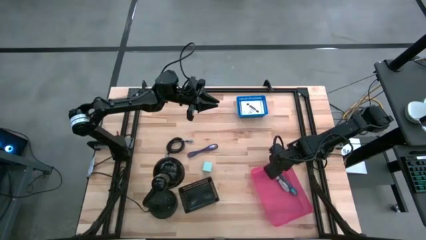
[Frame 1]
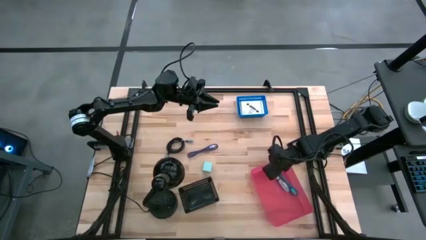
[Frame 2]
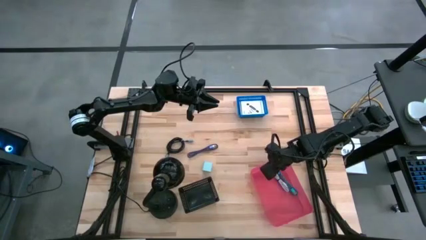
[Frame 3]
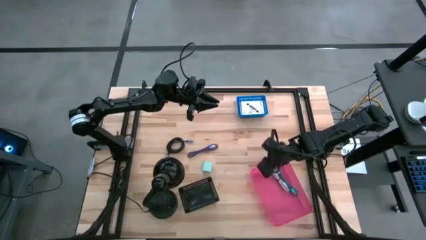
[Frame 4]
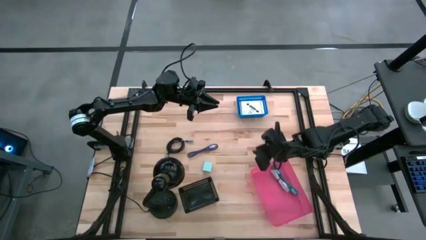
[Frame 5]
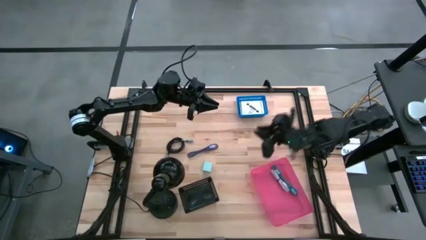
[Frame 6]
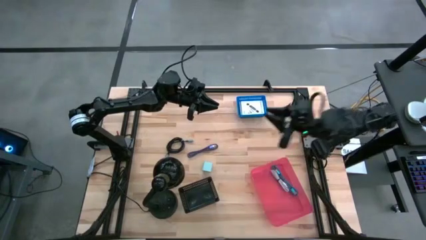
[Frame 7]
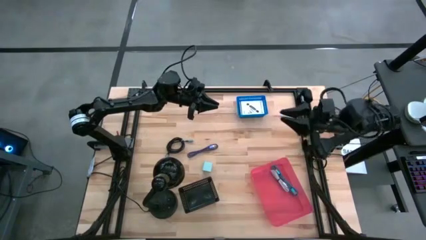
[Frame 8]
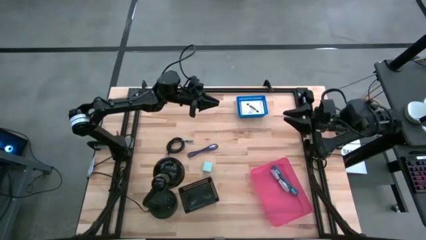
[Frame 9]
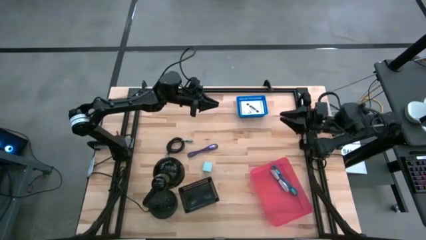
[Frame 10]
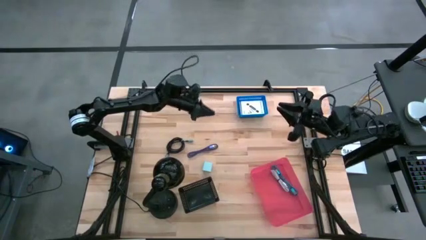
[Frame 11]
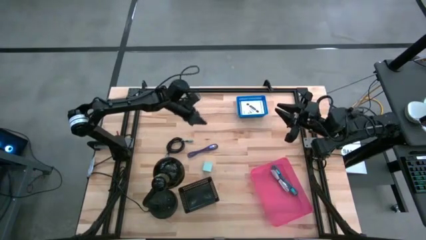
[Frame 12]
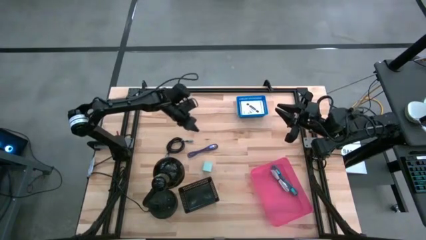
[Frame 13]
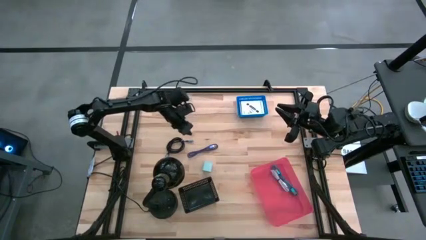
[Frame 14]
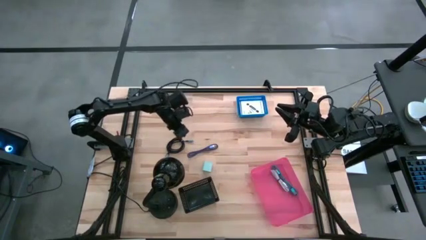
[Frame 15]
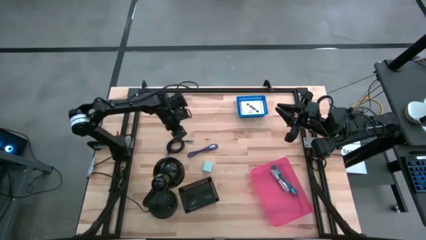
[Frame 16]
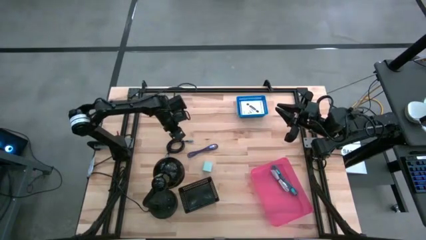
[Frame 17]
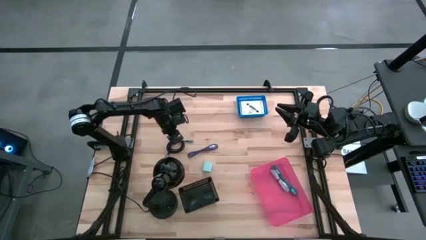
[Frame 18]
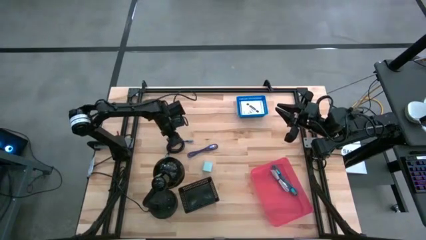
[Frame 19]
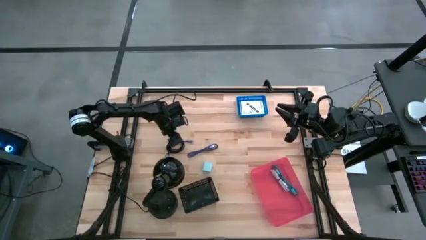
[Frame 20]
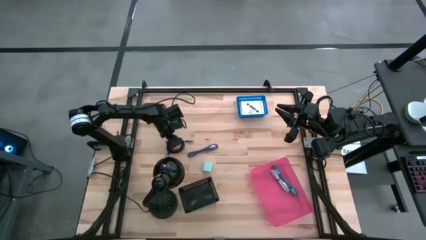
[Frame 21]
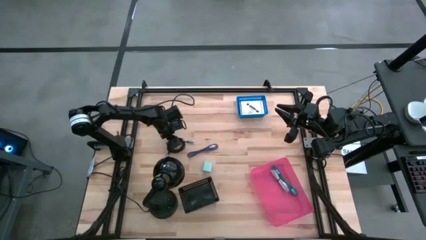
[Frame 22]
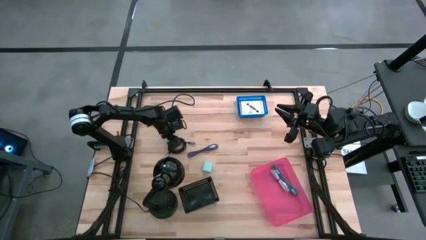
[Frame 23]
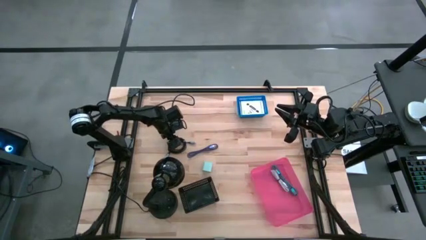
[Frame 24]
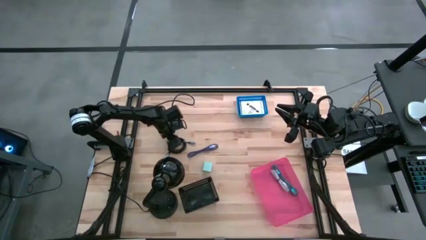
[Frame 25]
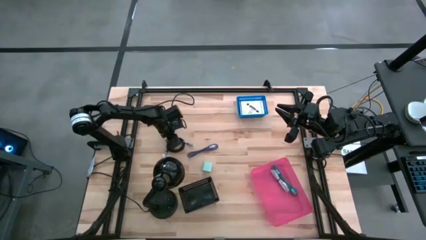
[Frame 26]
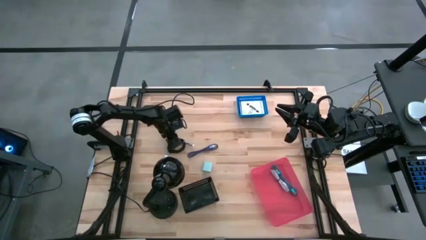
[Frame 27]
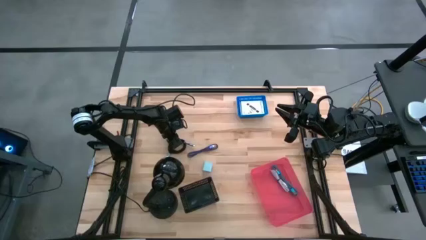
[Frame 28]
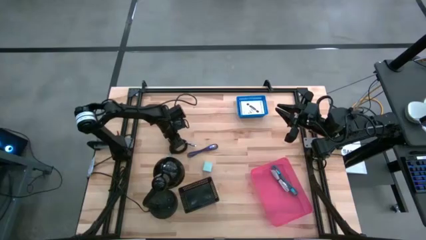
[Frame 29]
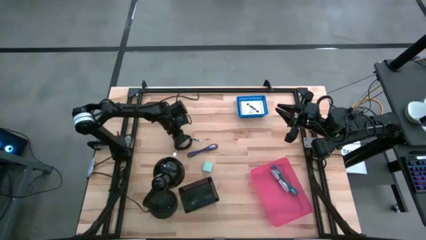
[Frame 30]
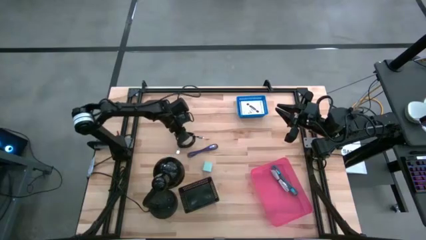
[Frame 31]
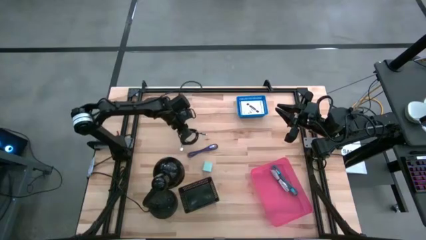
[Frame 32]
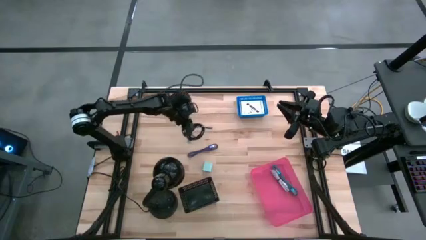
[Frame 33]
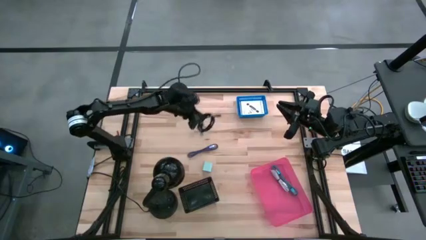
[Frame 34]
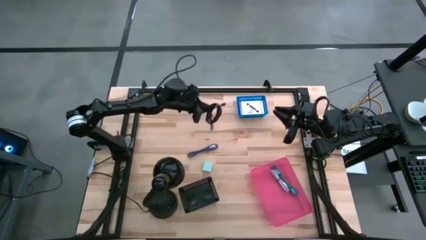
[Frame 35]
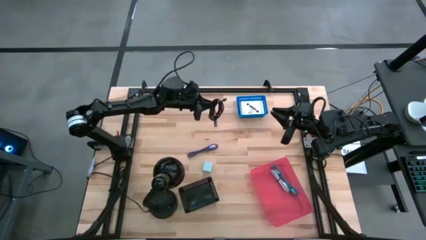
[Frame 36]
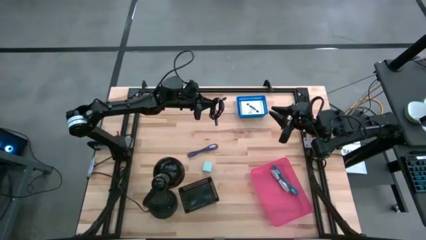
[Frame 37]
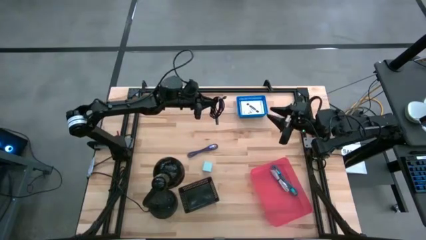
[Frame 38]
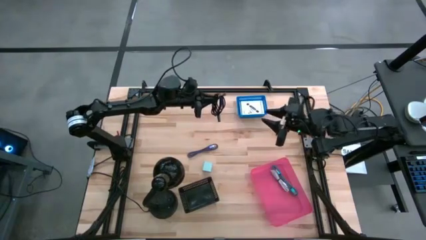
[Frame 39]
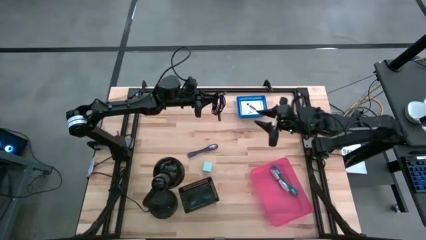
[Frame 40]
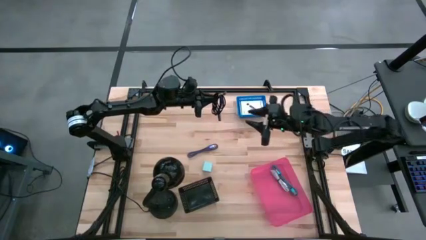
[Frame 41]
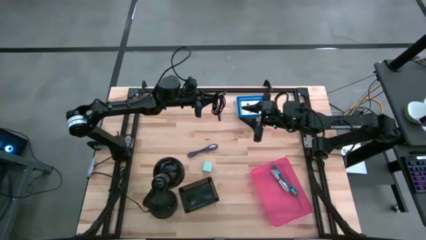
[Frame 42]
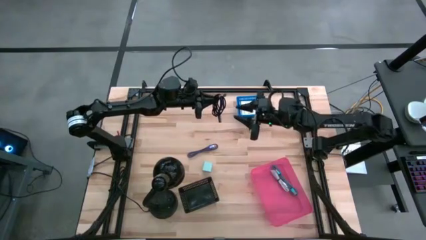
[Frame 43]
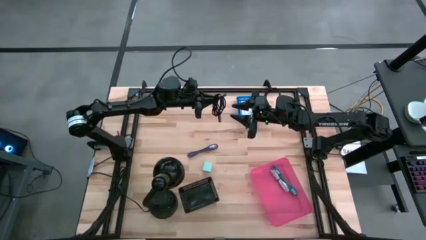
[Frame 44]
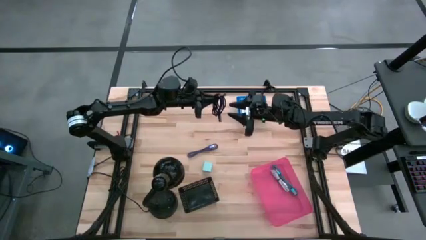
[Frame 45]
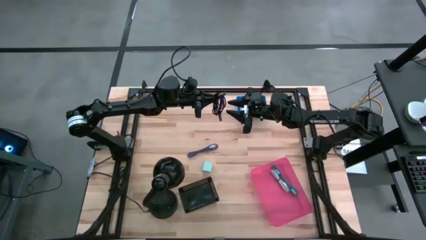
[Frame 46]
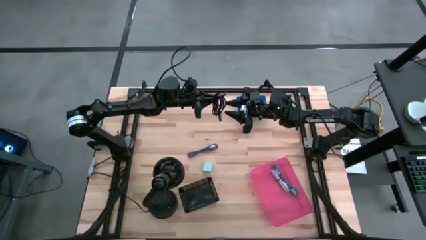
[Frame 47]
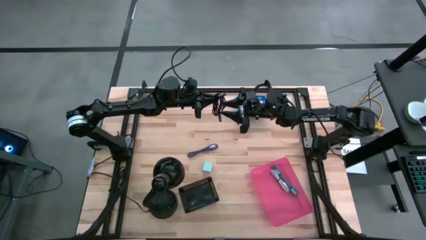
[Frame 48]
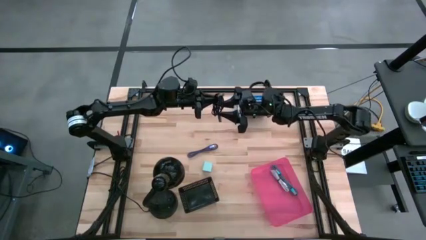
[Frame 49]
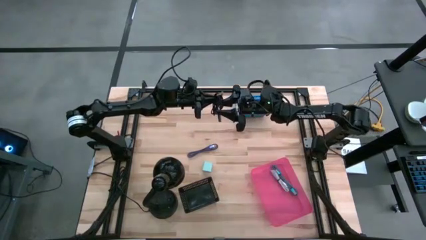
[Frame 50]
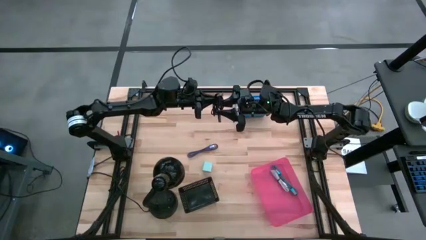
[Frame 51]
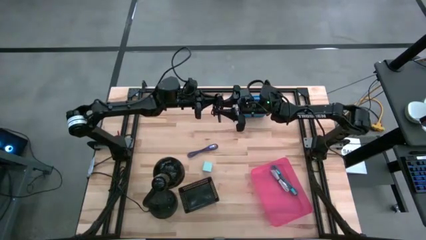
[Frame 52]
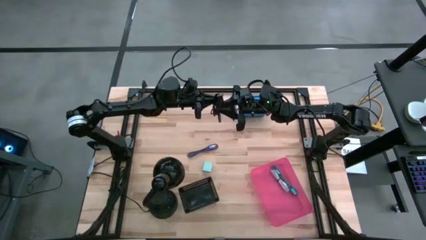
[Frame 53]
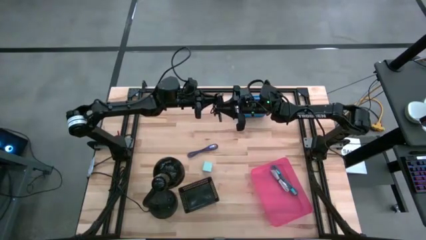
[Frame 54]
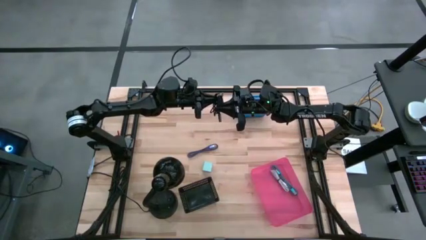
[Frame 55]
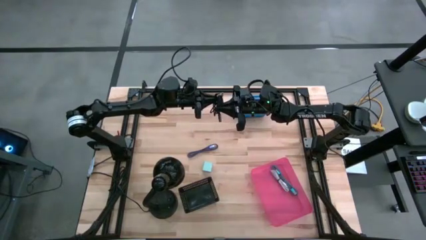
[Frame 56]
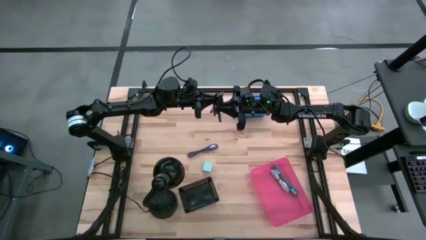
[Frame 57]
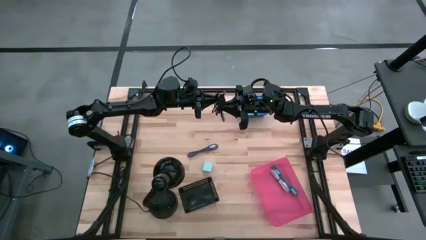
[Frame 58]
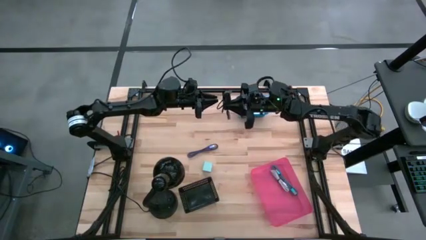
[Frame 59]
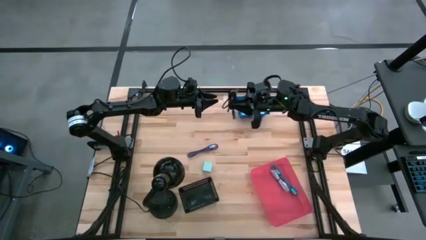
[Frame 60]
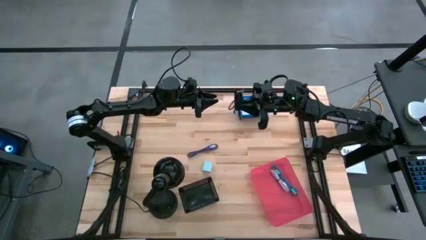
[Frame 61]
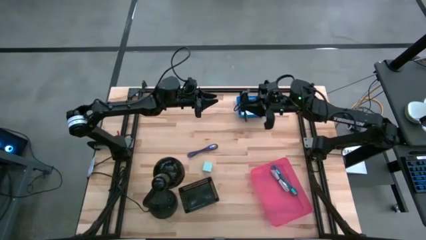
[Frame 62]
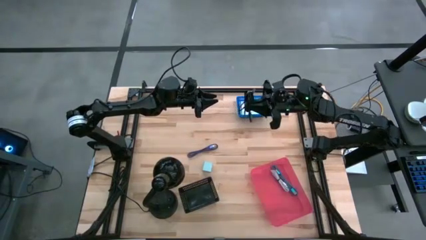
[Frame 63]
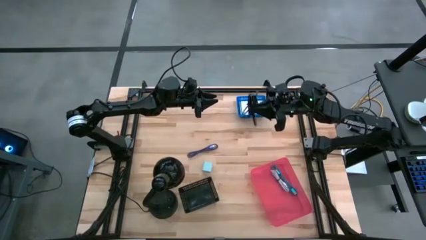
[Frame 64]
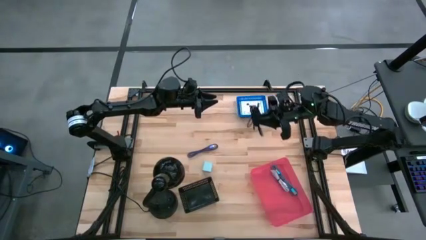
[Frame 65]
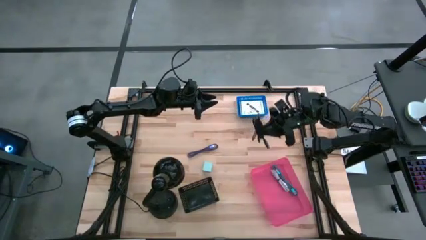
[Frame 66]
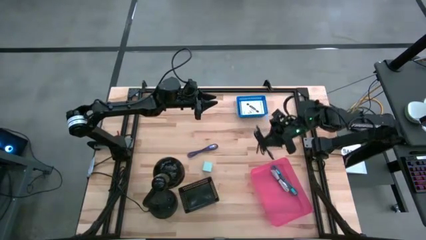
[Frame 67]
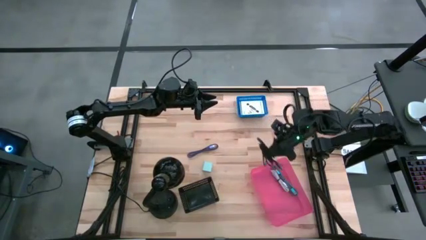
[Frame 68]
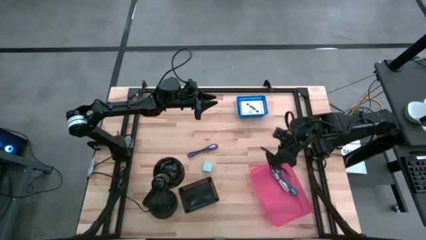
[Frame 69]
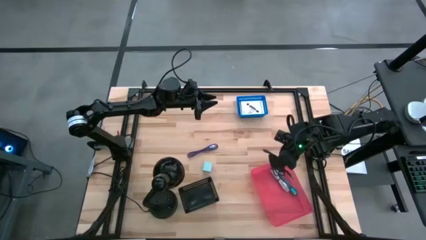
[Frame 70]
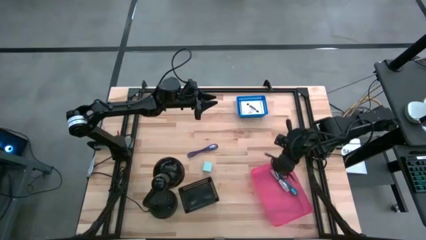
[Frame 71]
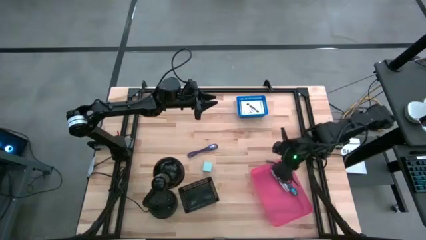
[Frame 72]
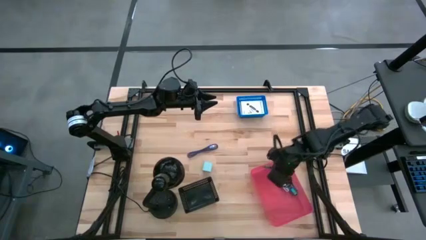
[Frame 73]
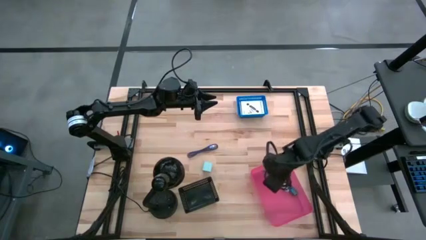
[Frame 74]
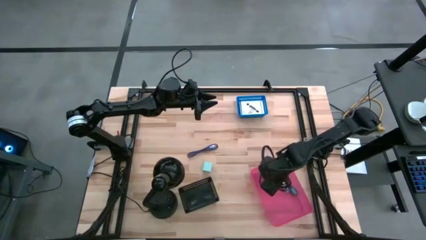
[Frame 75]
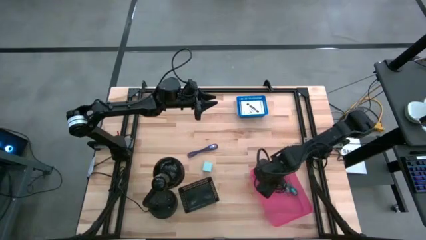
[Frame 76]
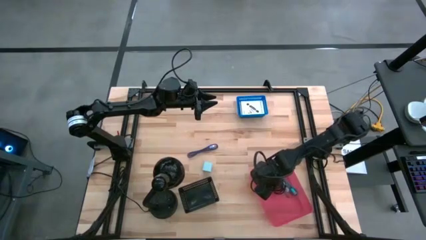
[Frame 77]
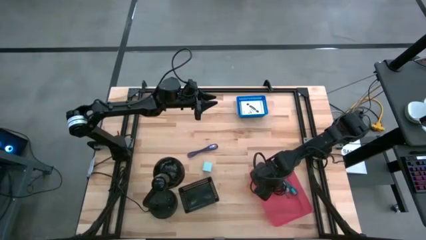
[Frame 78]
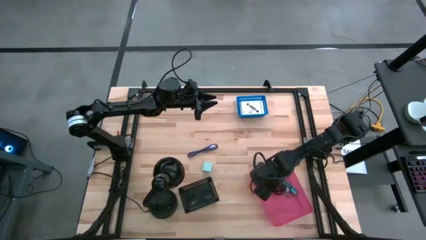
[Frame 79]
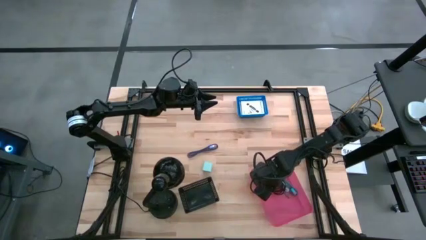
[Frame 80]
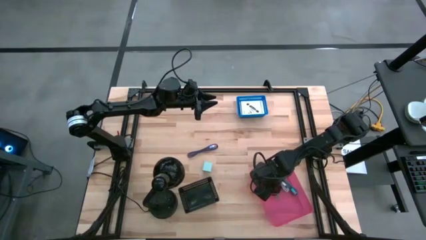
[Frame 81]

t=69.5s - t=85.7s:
Task: Pick and place items into bin
Put the black charger cable into the pink bin
